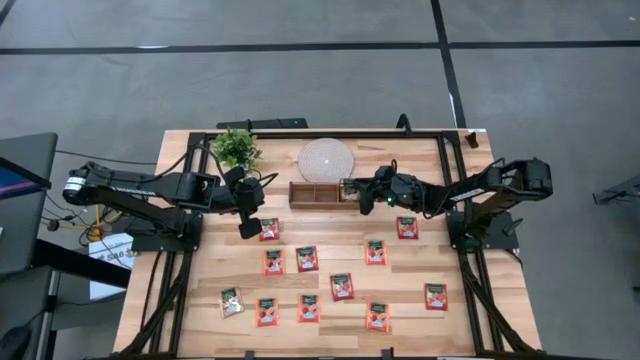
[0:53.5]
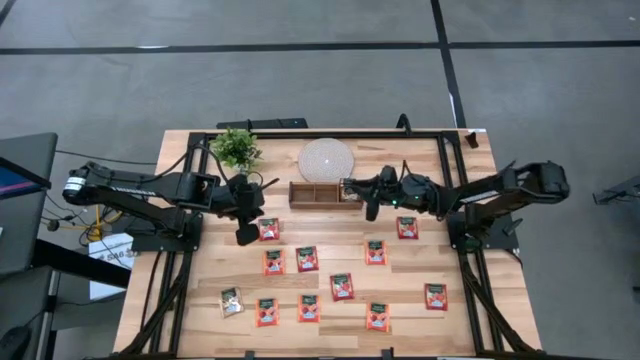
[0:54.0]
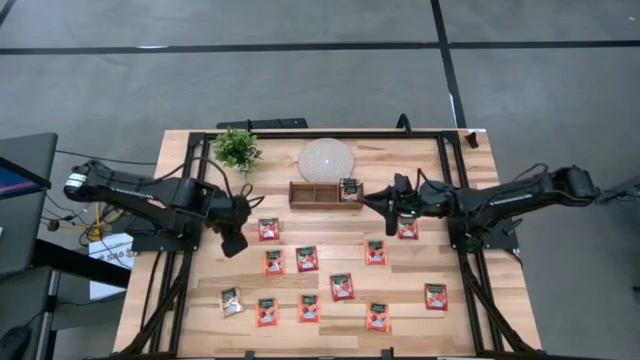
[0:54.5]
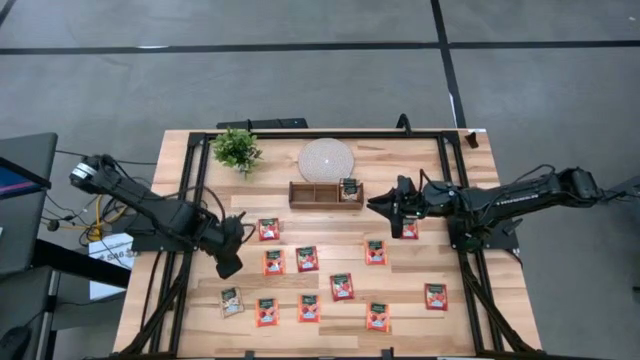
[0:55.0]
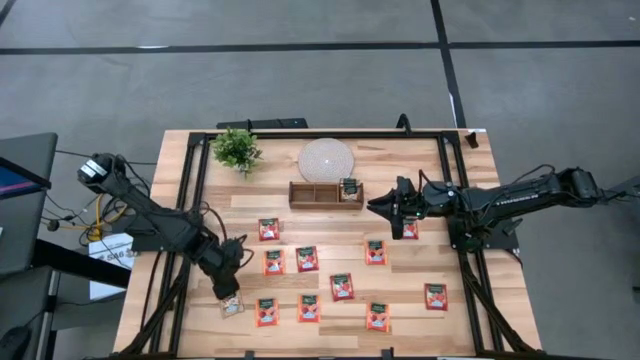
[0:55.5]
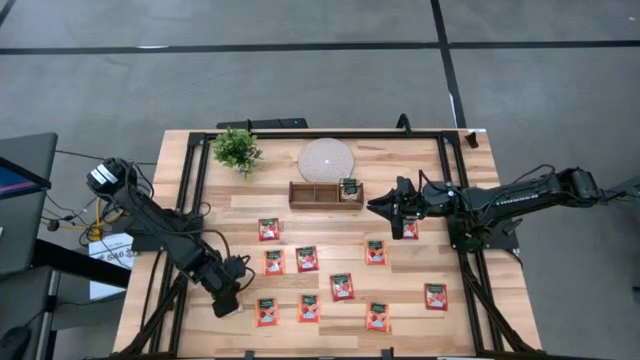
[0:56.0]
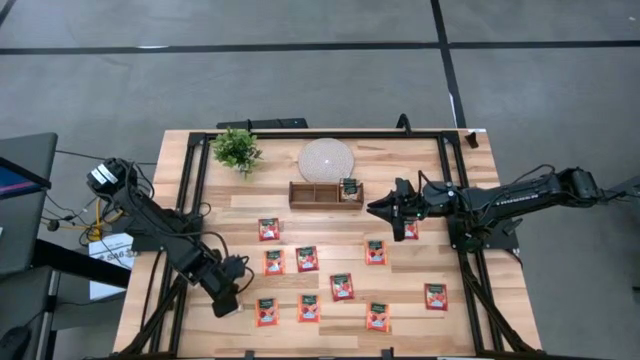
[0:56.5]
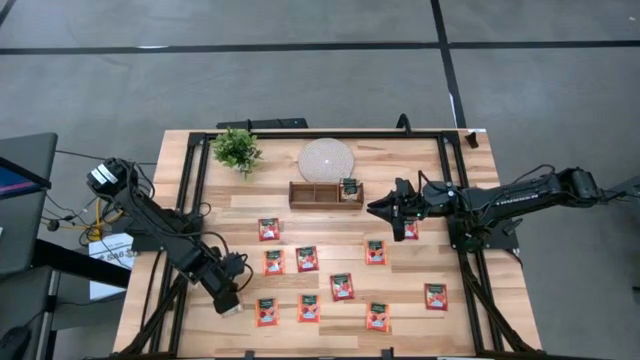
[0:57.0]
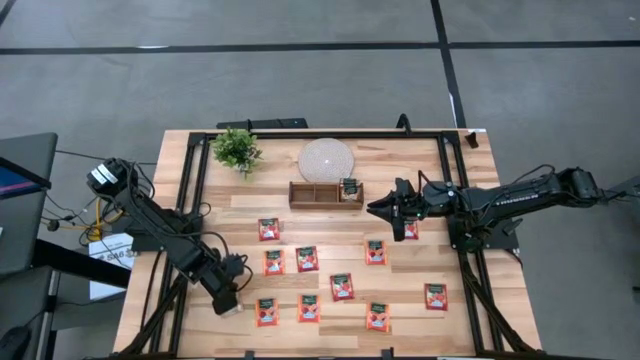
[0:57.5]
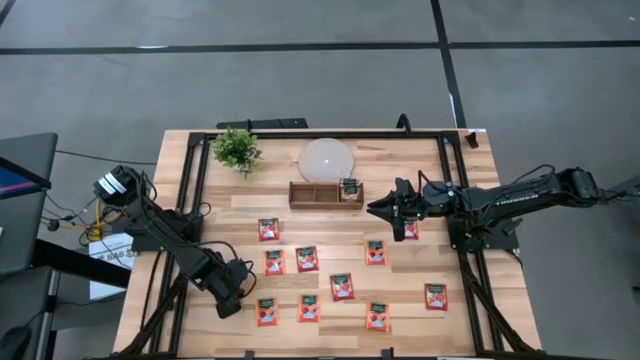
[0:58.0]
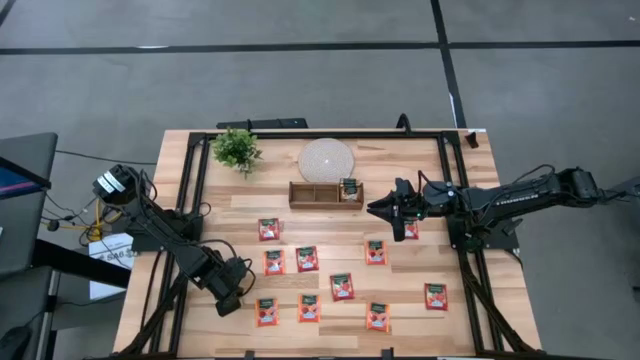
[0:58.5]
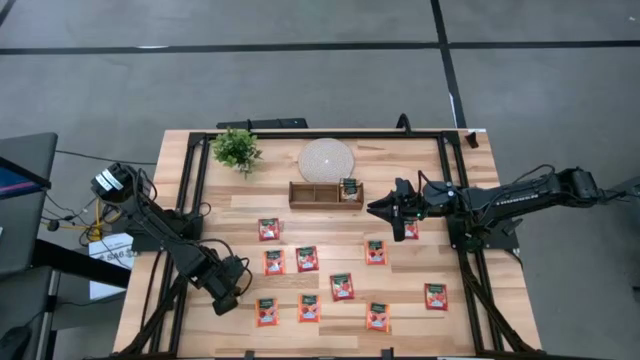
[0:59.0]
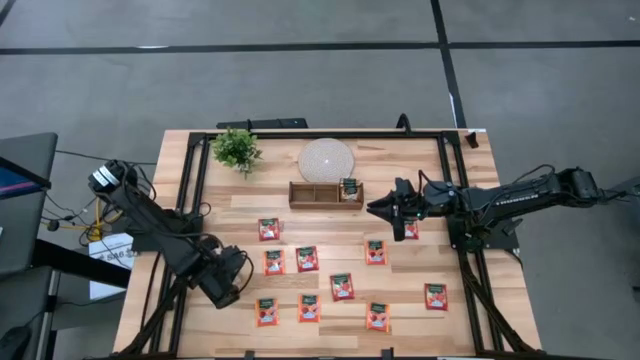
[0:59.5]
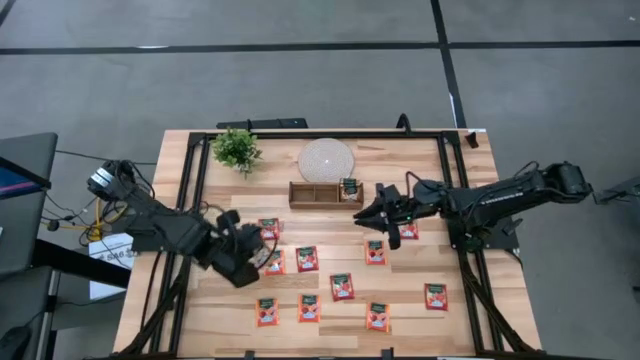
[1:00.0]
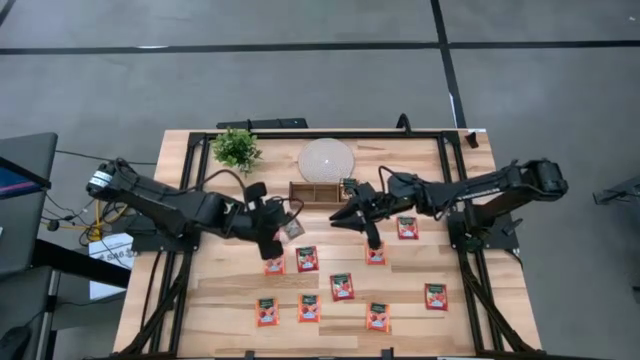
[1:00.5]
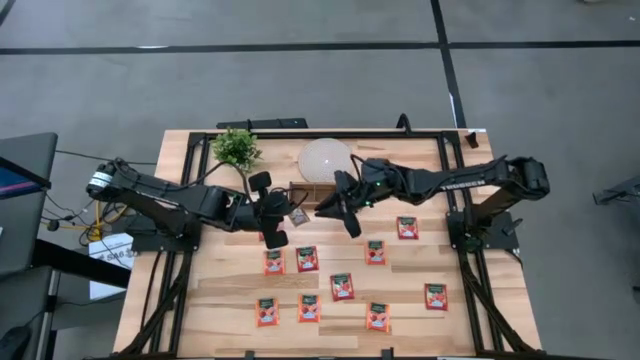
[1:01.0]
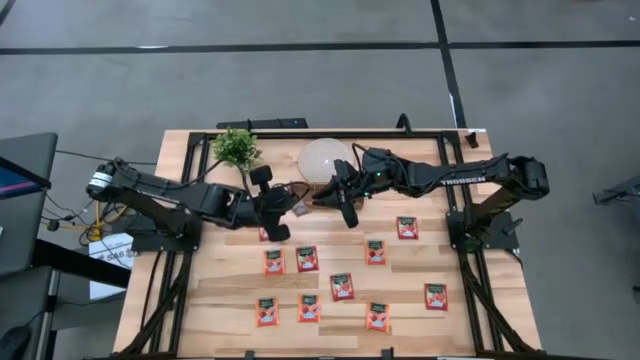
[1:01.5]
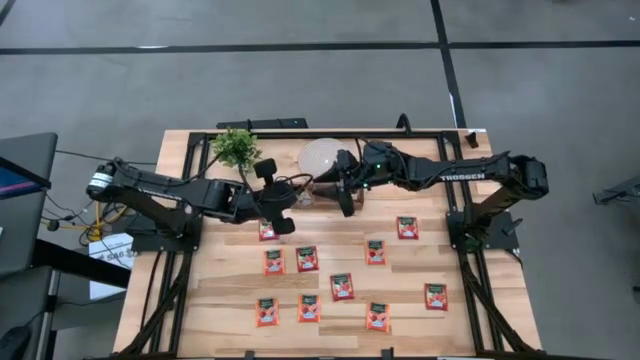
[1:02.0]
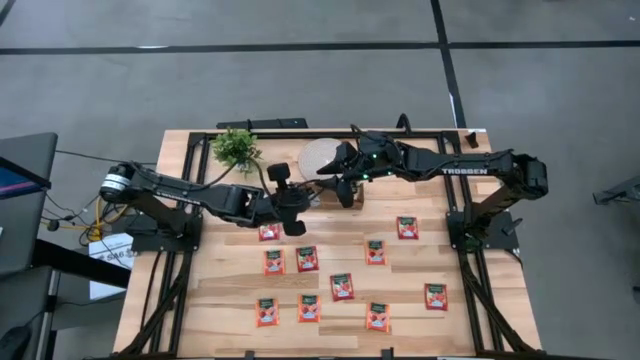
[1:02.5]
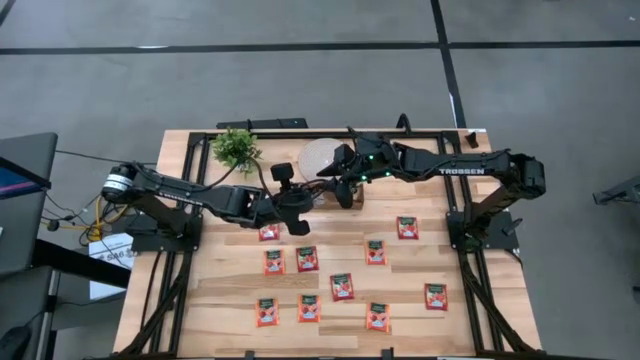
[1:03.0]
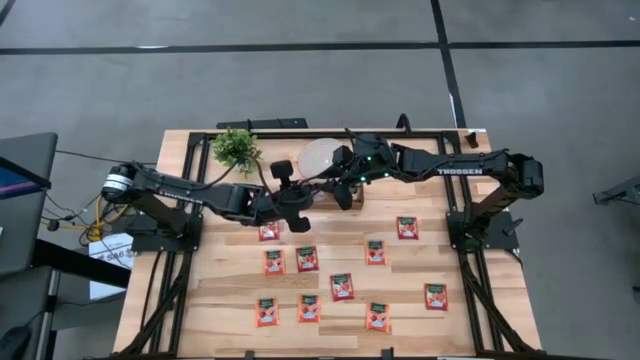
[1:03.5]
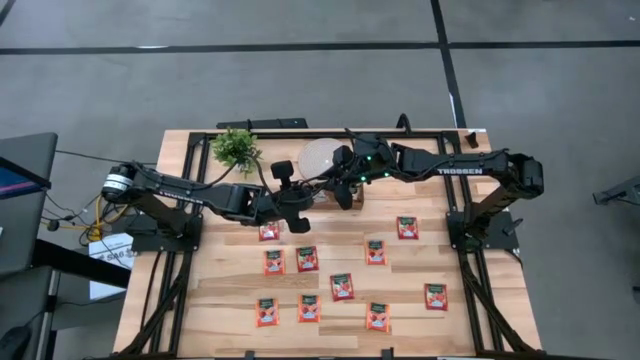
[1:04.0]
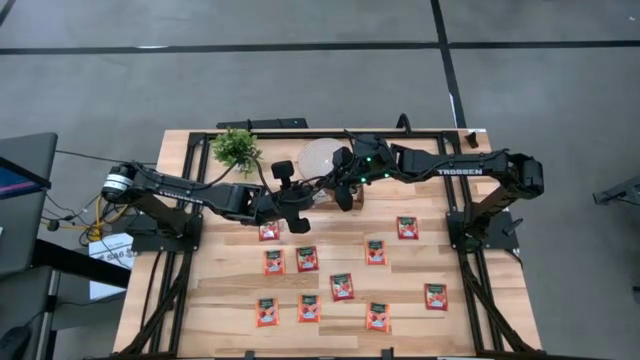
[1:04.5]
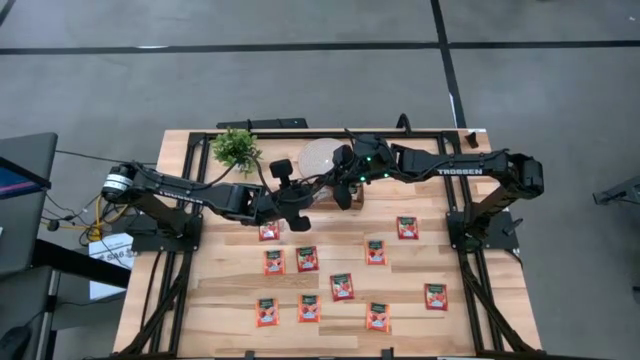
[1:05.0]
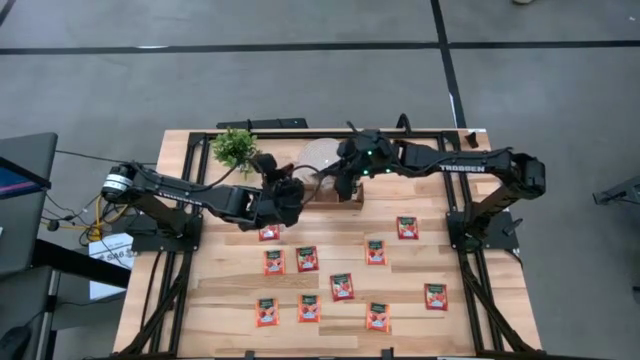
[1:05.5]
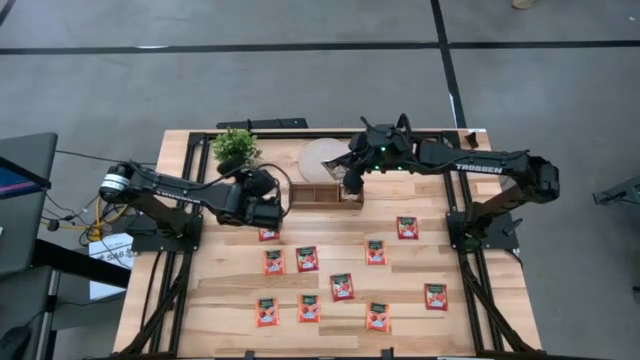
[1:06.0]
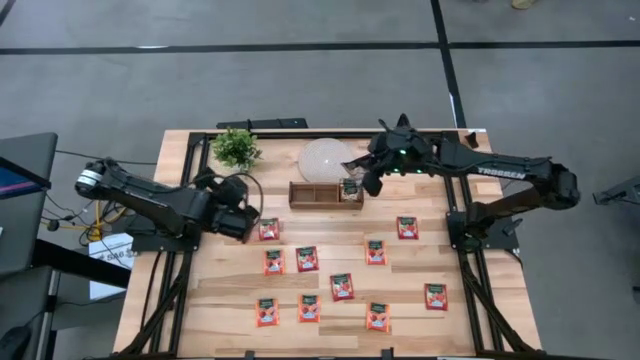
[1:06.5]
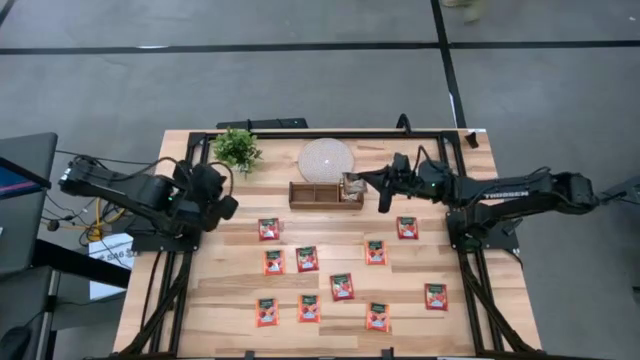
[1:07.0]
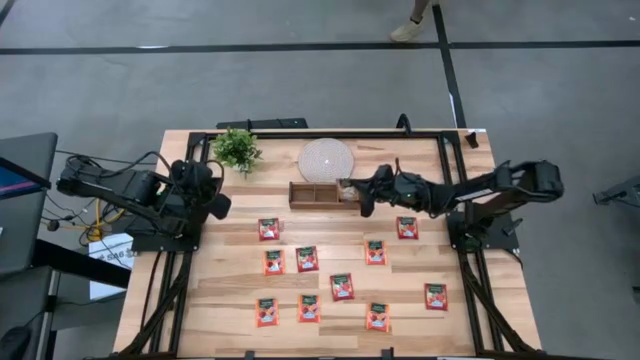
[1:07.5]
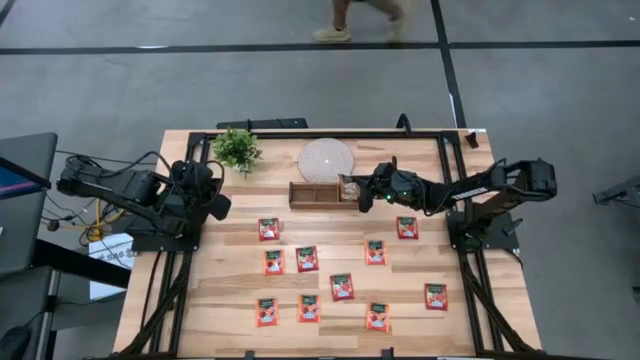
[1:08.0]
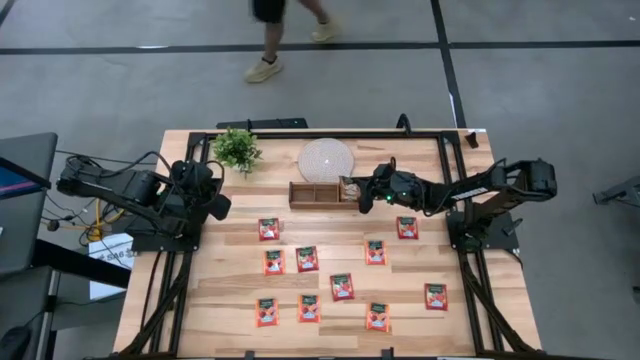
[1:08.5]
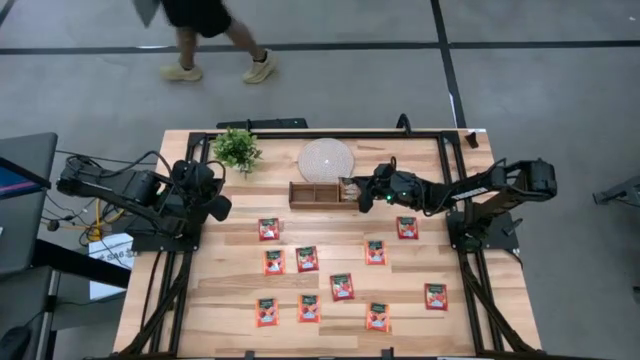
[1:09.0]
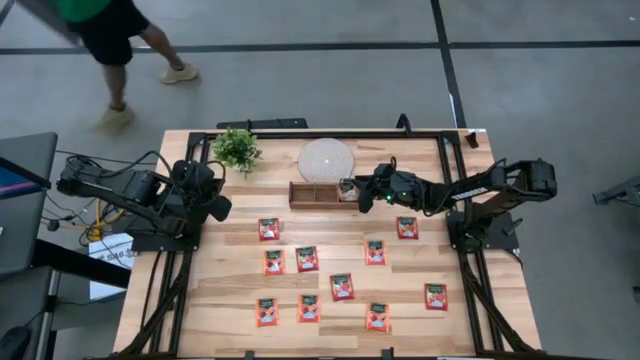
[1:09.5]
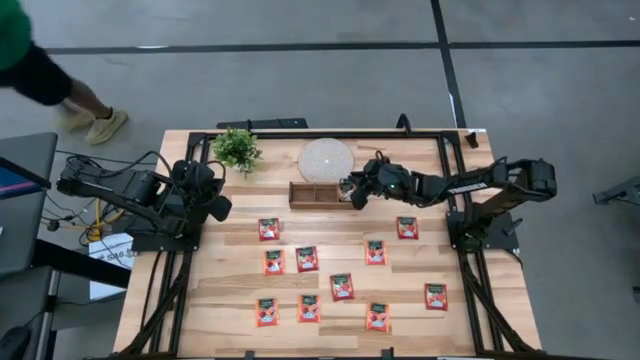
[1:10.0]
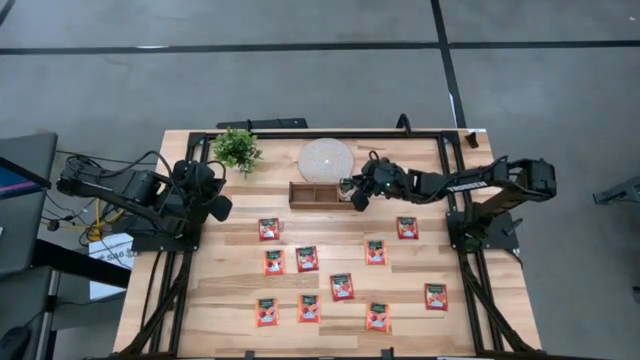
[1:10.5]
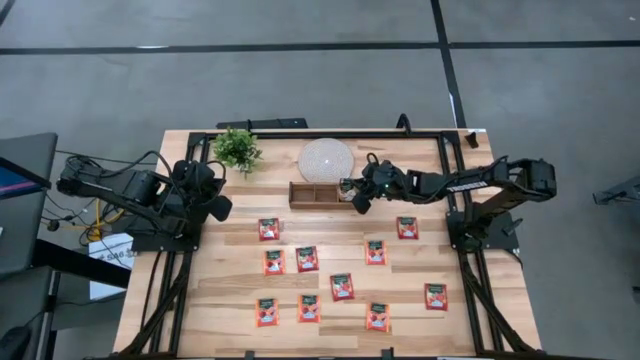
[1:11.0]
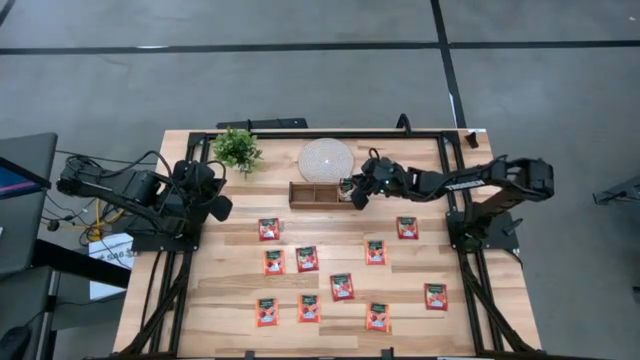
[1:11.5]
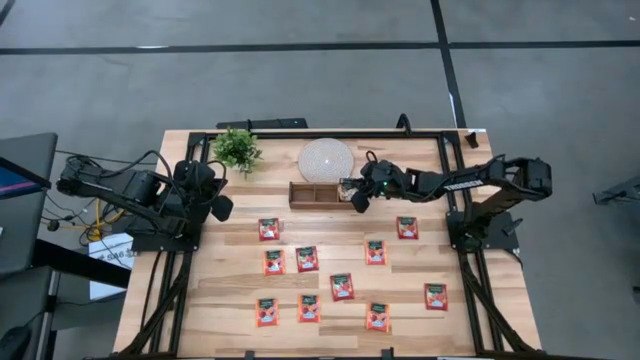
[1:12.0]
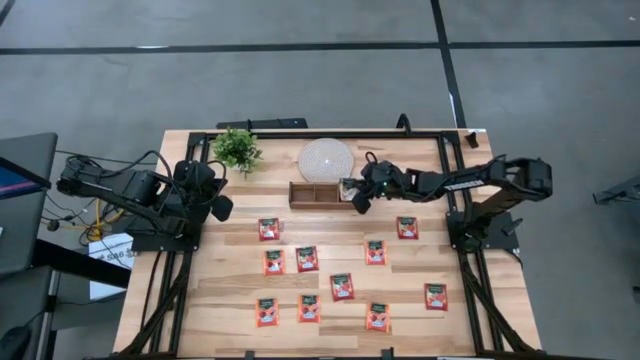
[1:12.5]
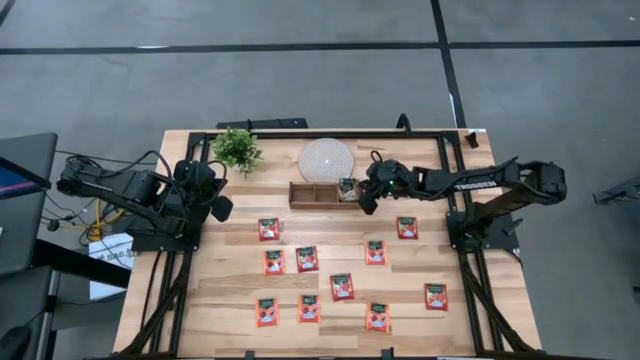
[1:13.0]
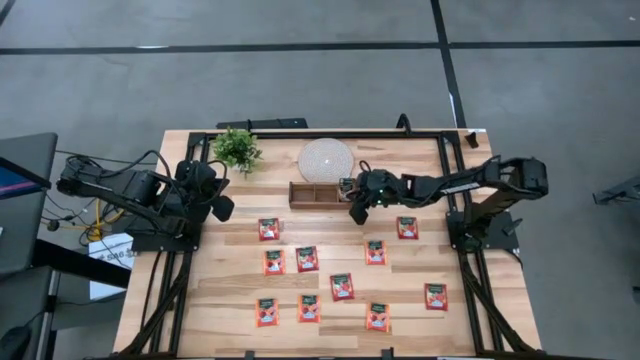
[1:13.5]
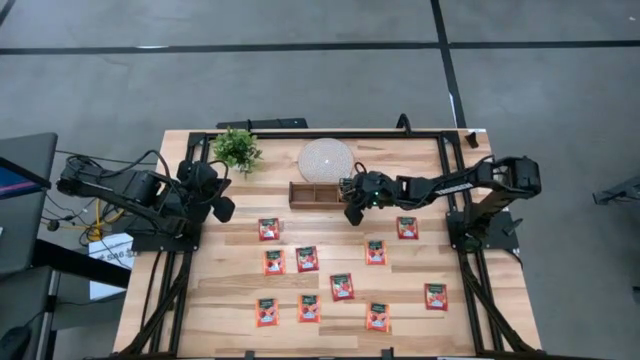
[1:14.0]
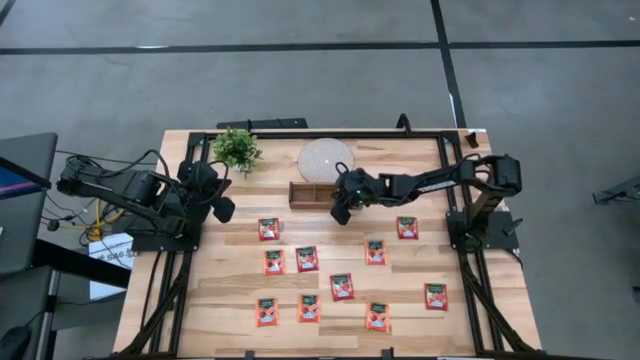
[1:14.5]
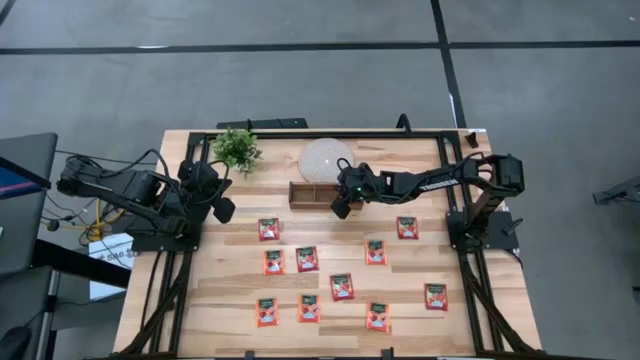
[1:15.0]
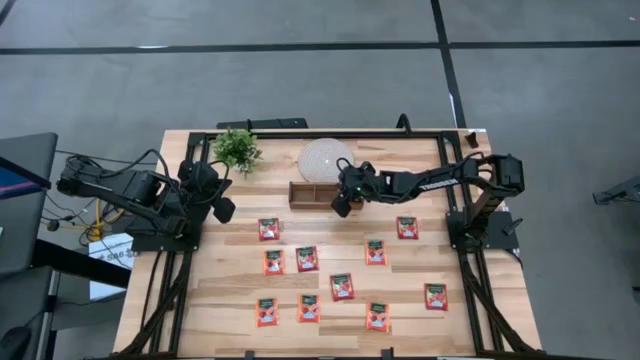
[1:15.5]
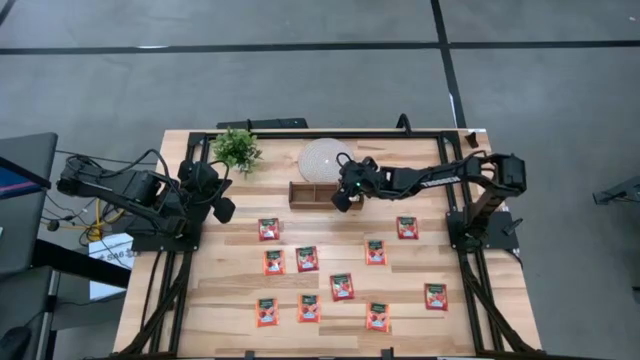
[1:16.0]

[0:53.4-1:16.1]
Task: Pick & Place Tea
Put the brown tea bag into the right section of the wooden organizer
